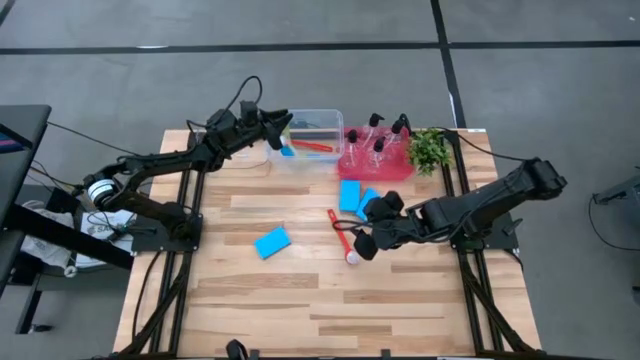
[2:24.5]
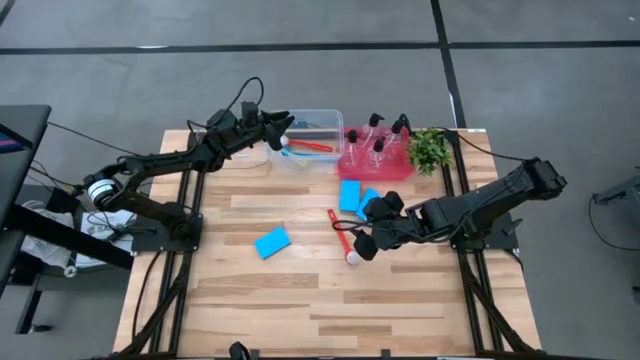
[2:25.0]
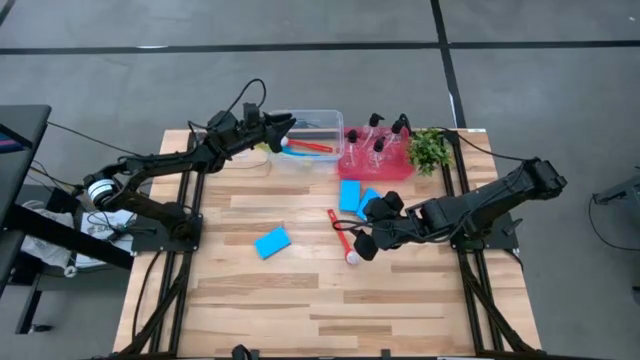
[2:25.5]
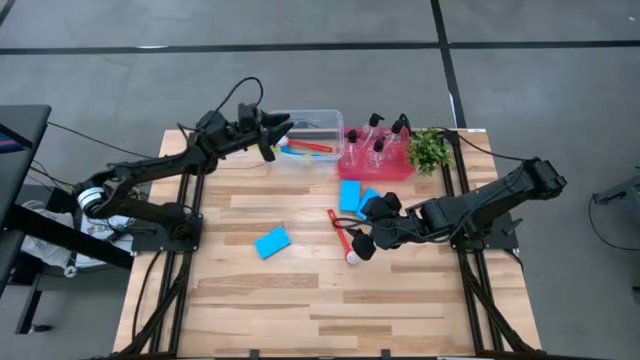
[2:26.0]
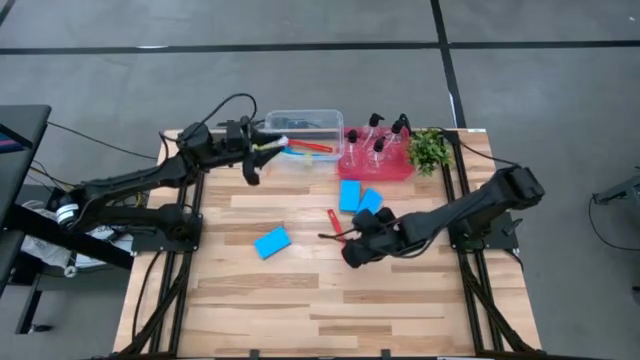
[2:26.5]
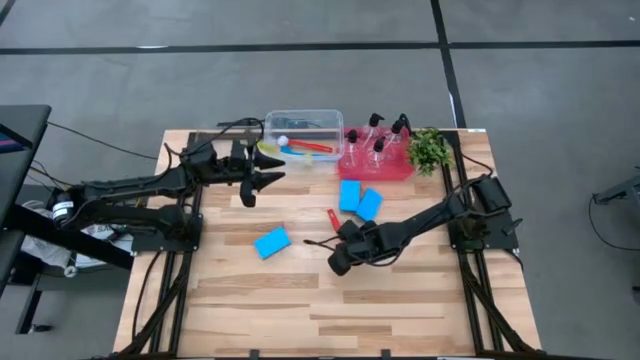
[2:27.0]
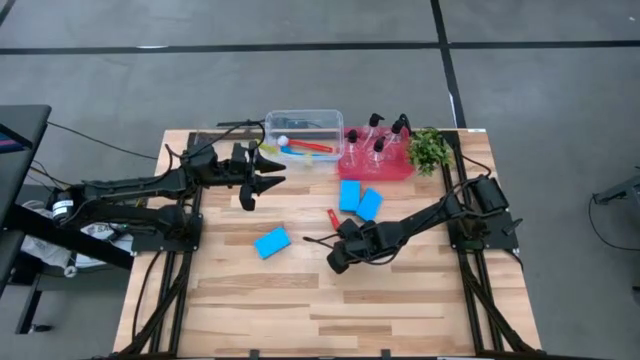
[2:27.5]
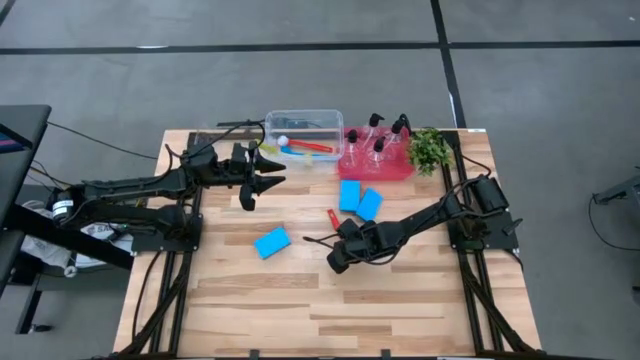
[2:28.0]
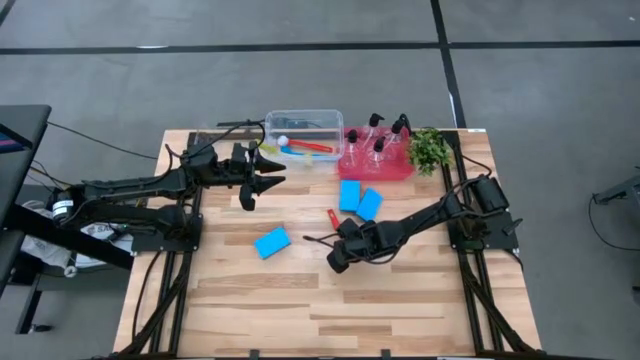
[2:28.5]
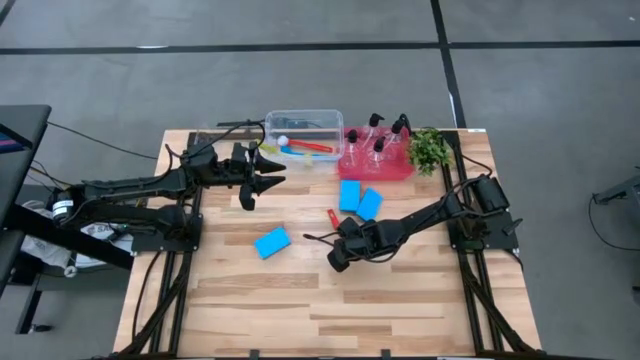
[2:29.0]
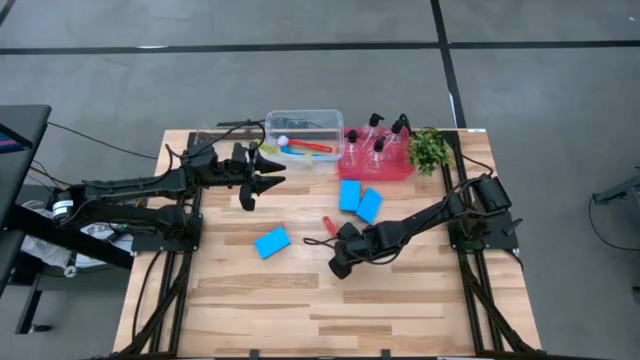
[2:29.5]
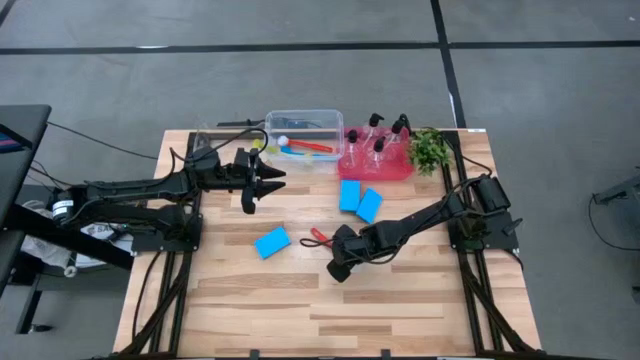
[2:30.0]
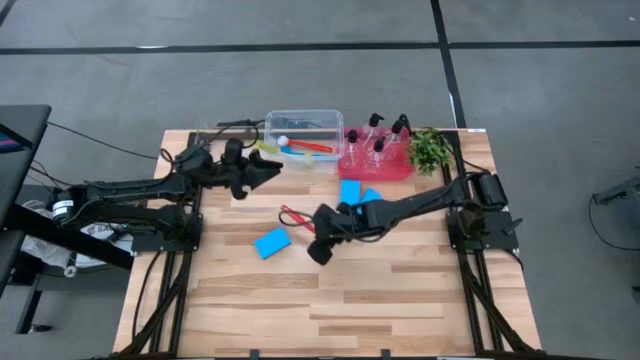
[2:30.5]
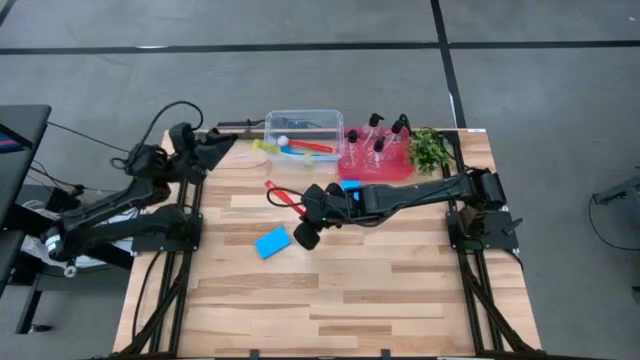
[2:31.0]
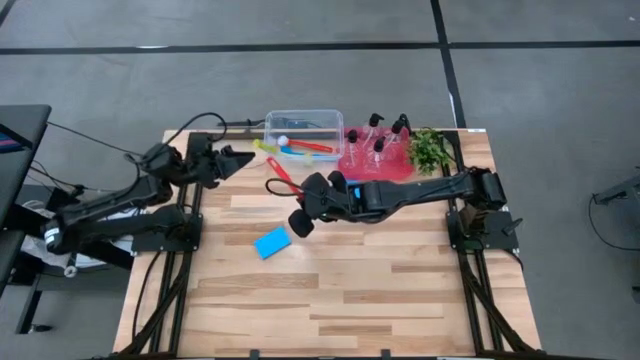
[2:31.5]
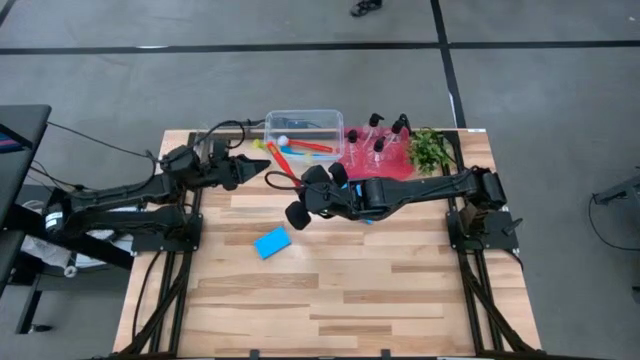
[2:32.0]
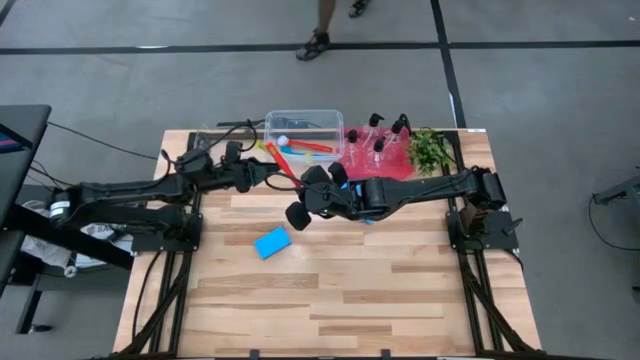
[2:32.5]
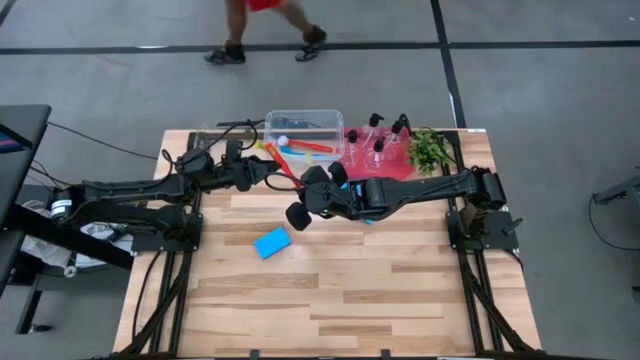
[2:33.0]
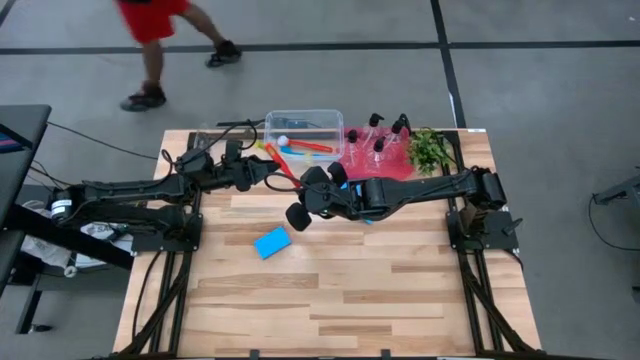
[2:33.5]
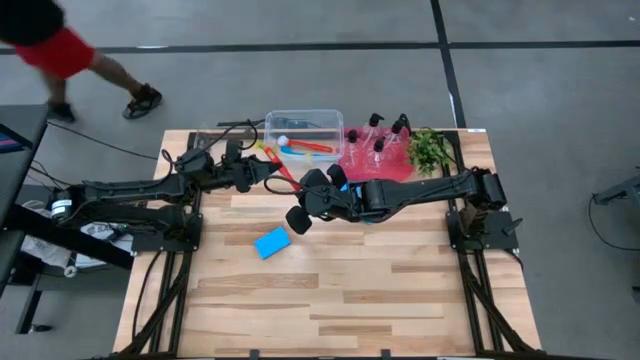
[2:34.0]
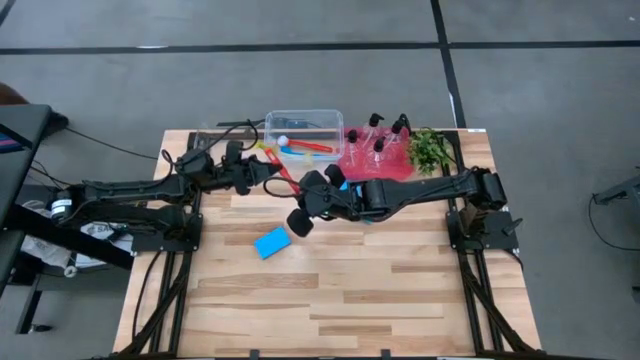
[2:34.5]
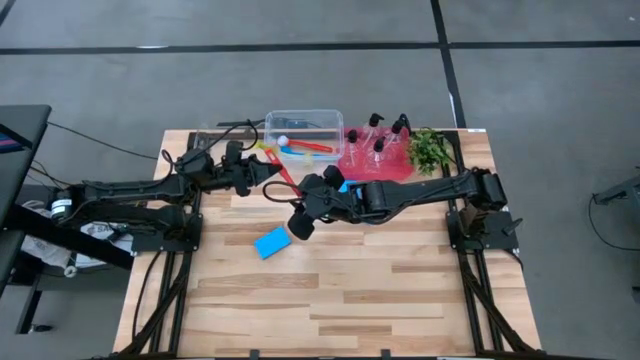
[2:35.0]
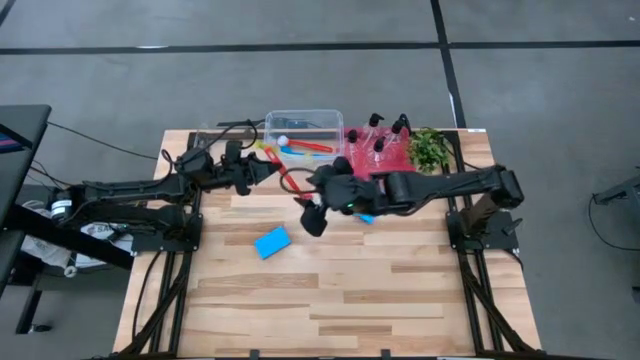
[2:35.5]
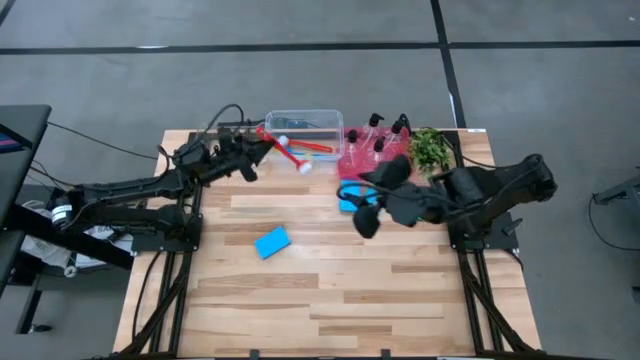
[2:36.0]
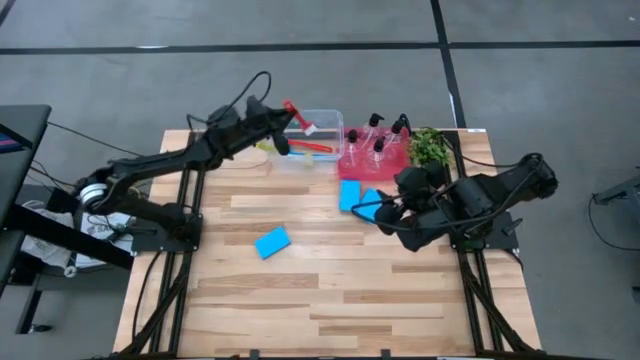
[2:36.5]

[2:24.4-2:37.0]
Task: Pick & Place Kitchen Sink Supplies
Put the red toilet brush into the white bin

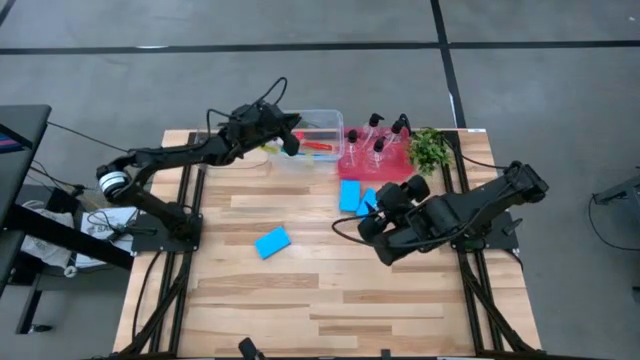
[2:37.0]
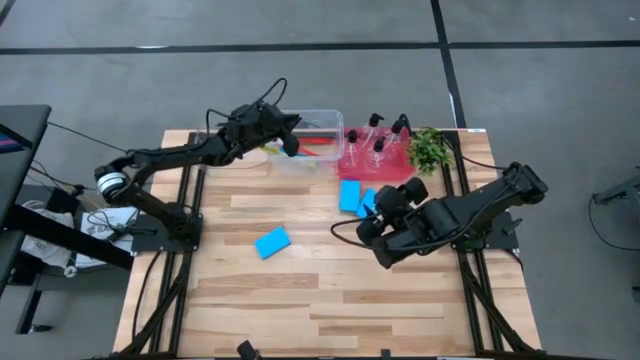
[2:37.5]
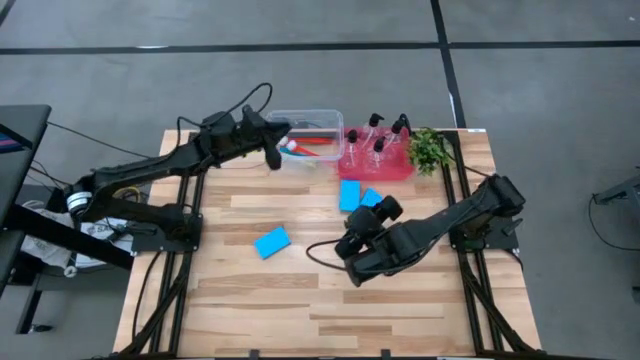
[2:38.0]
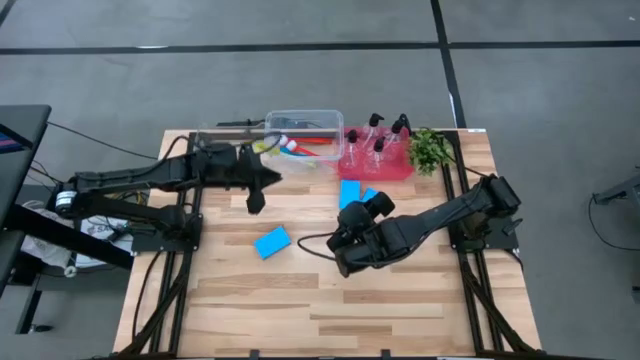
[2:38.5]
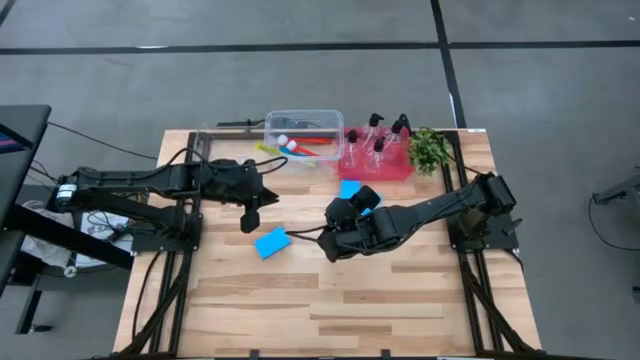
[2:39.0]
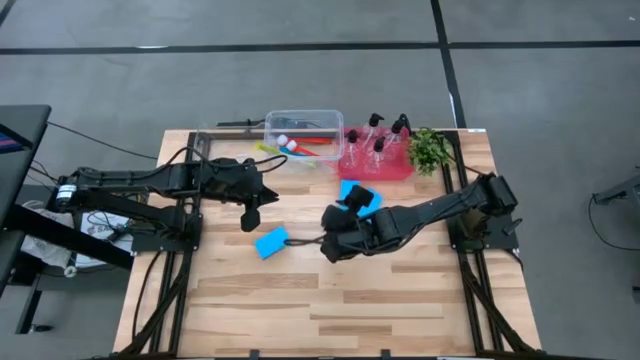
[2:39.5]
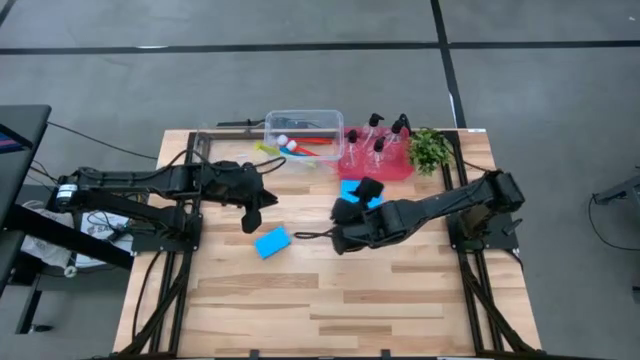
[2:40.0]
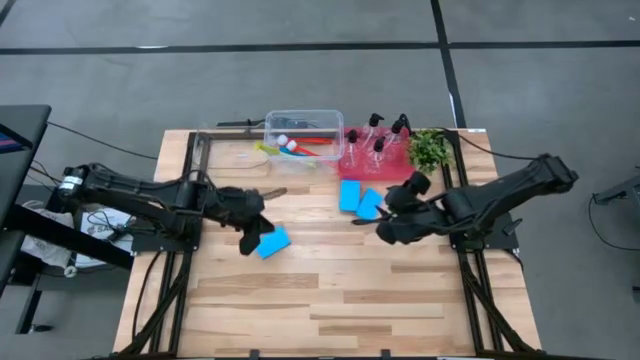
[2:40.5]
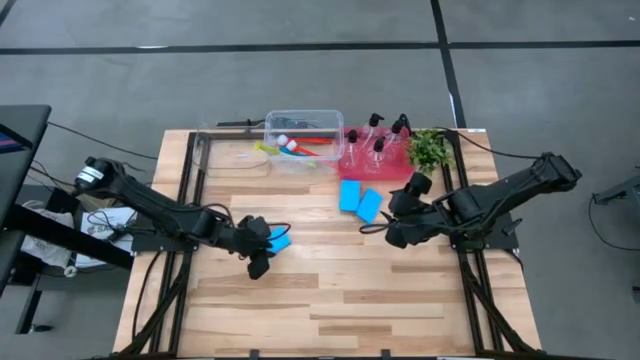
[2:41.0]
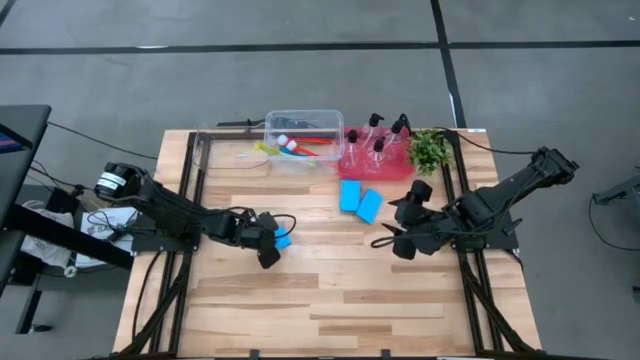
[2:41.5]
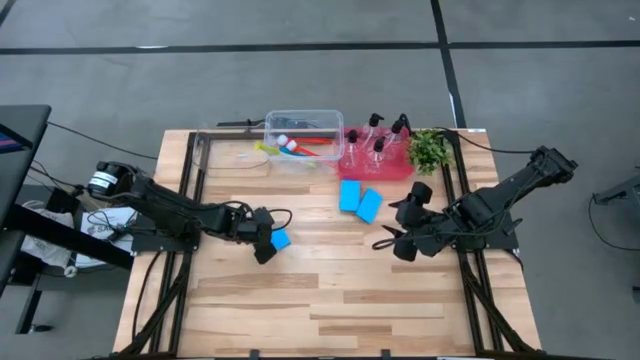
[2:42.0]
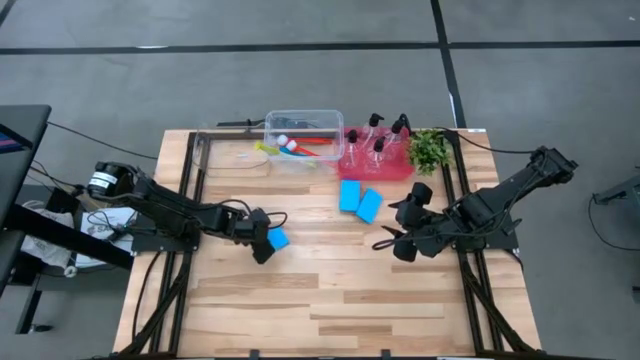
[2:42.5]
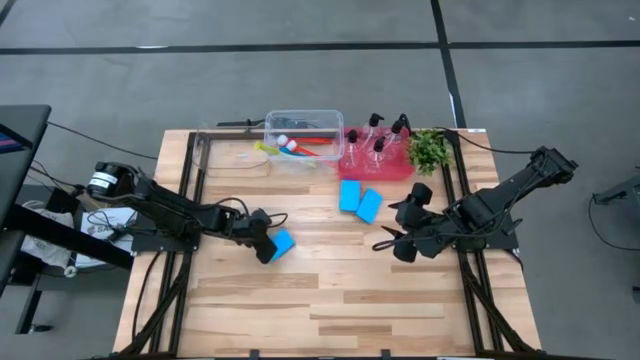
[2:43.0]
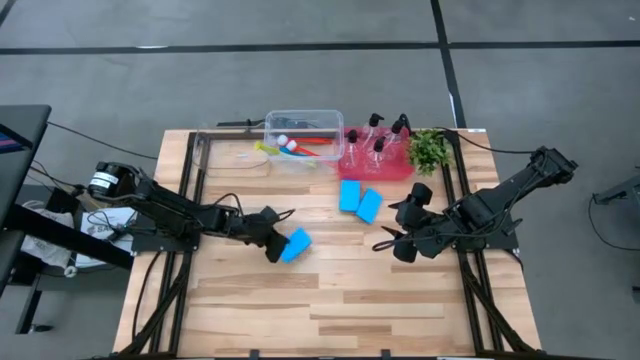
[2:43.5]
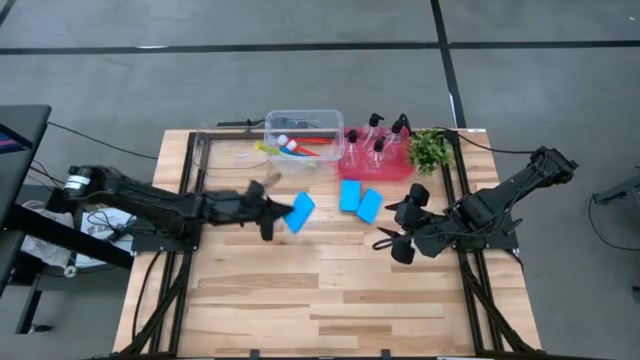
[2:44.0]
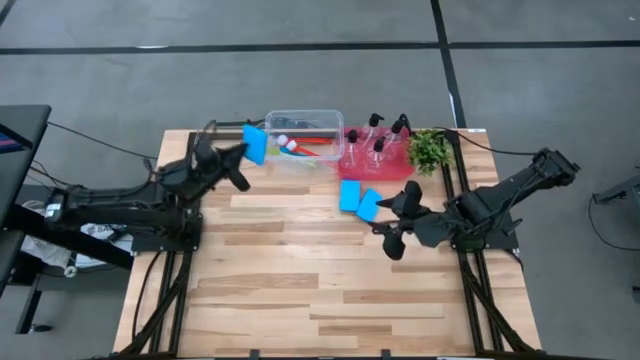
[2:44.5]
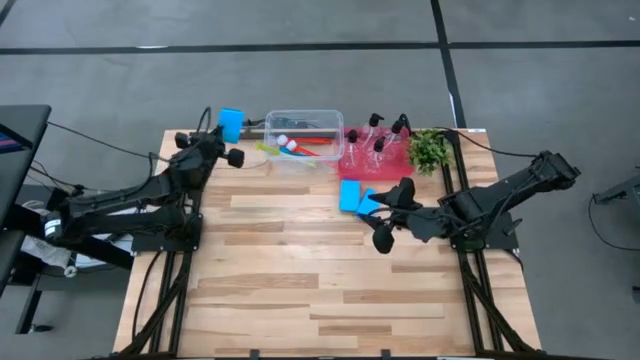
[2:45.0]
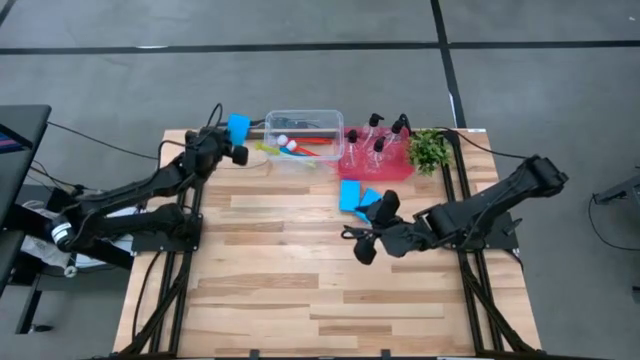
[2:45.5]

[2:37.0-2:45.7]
Put the blue sponge into the transparent bin
